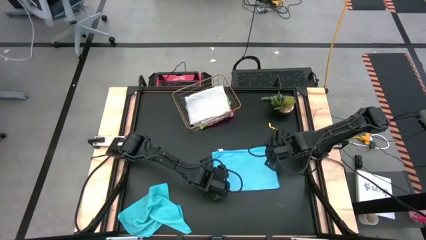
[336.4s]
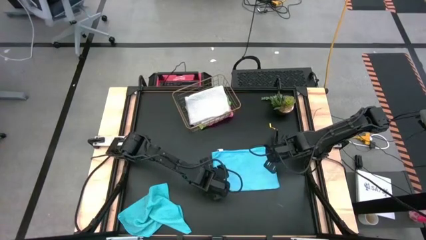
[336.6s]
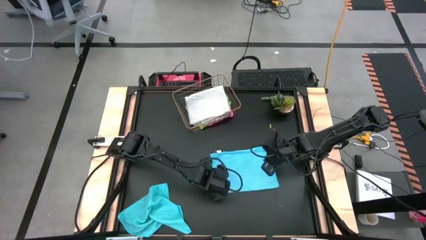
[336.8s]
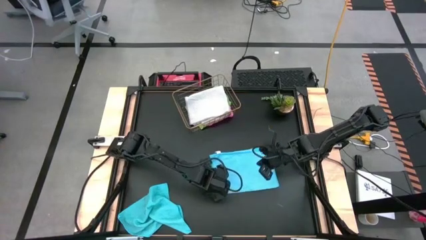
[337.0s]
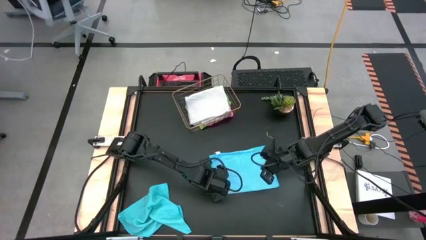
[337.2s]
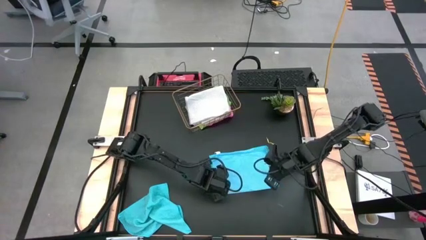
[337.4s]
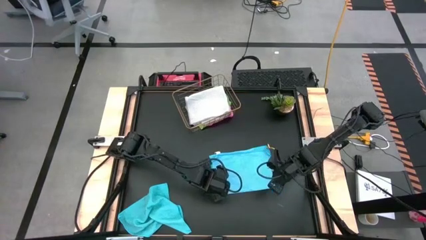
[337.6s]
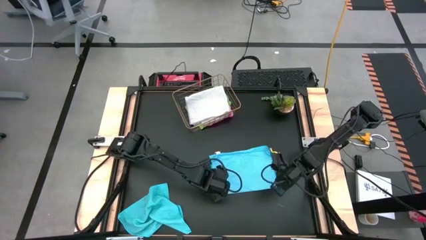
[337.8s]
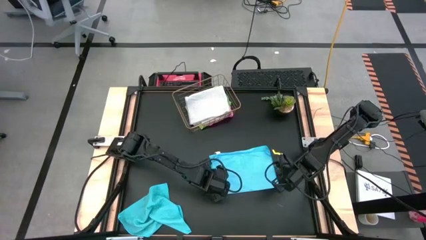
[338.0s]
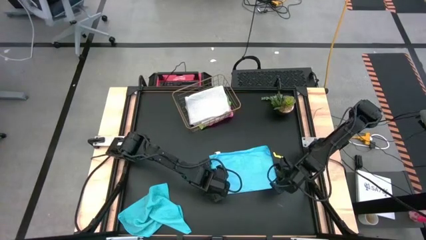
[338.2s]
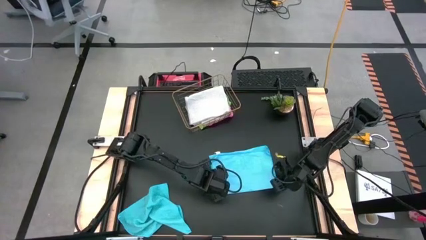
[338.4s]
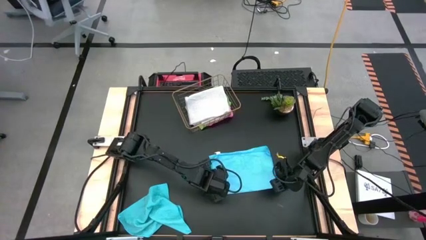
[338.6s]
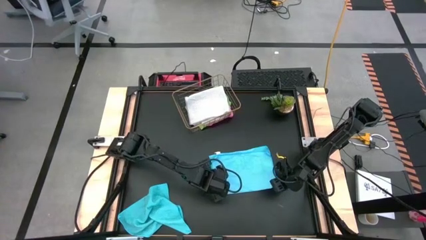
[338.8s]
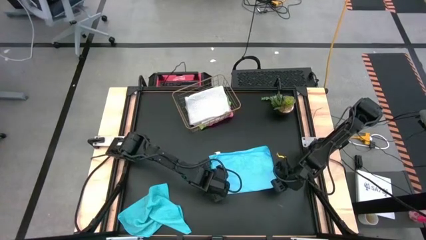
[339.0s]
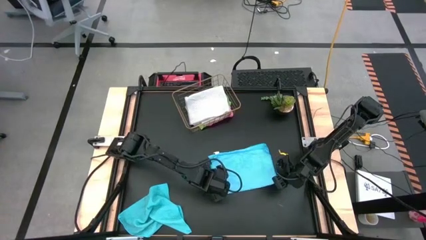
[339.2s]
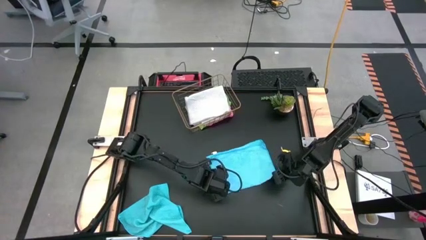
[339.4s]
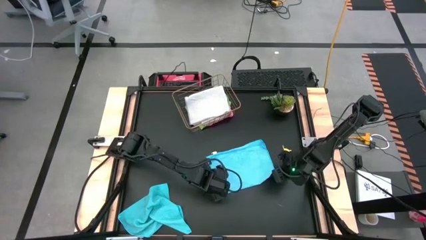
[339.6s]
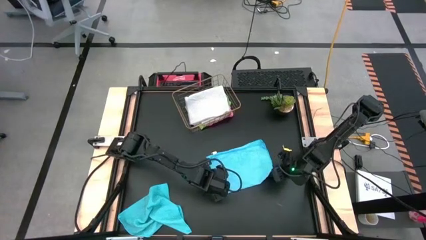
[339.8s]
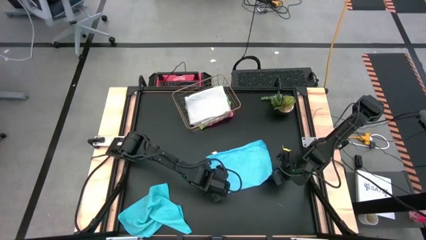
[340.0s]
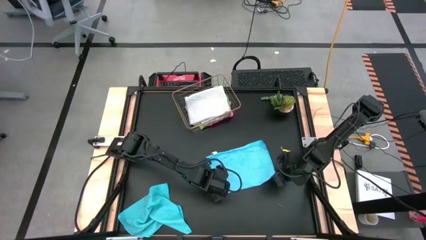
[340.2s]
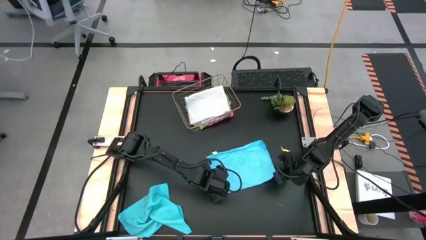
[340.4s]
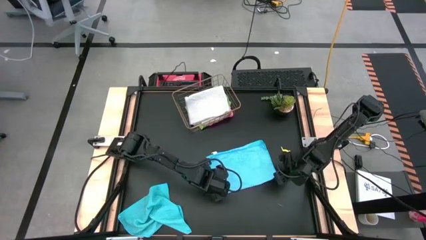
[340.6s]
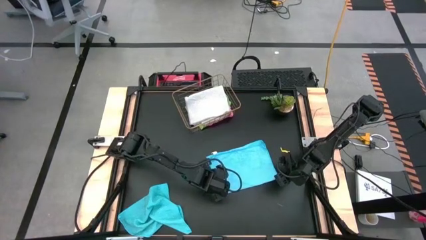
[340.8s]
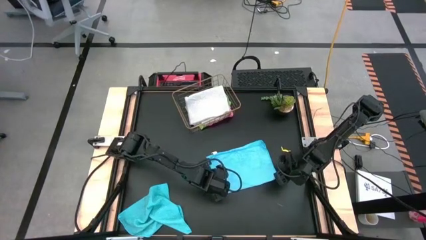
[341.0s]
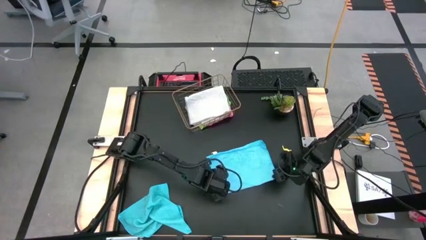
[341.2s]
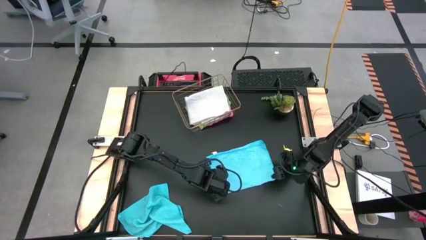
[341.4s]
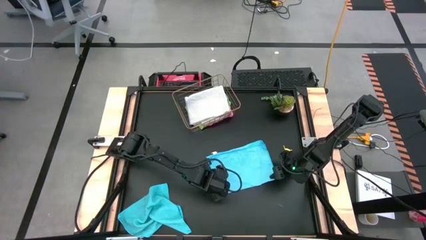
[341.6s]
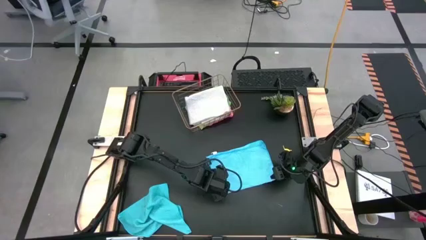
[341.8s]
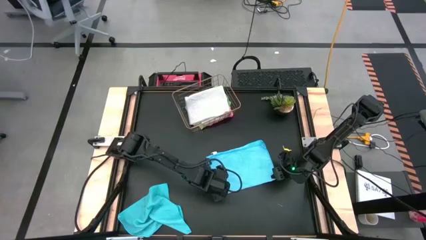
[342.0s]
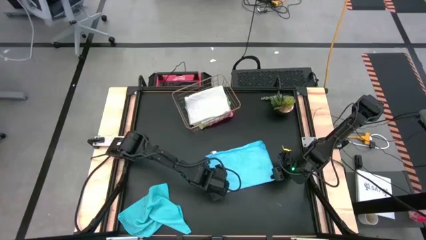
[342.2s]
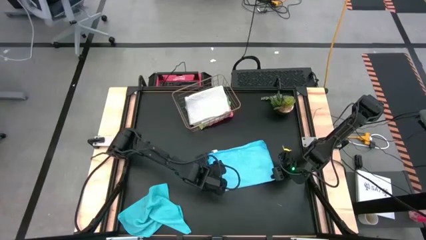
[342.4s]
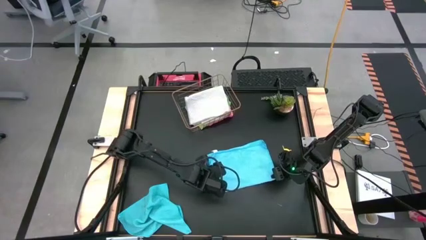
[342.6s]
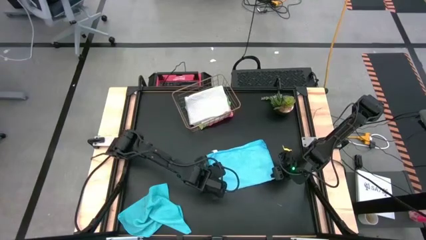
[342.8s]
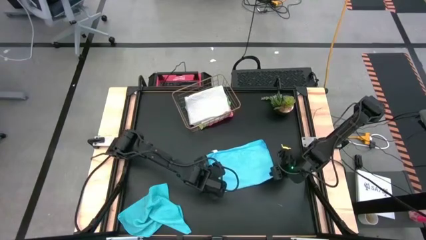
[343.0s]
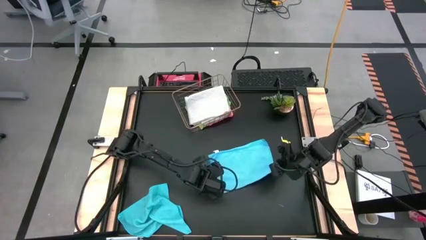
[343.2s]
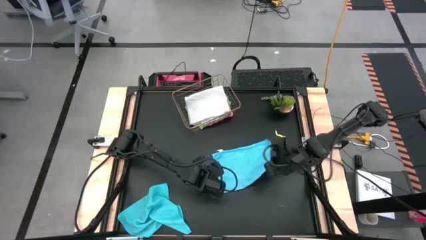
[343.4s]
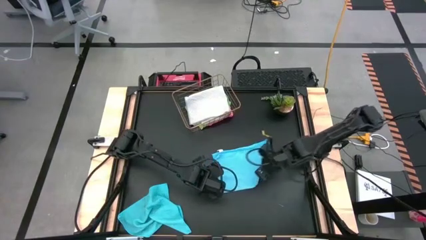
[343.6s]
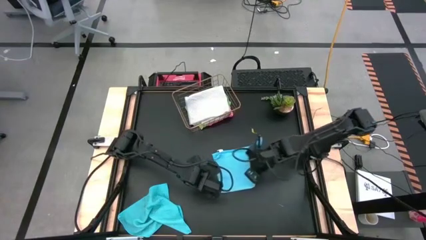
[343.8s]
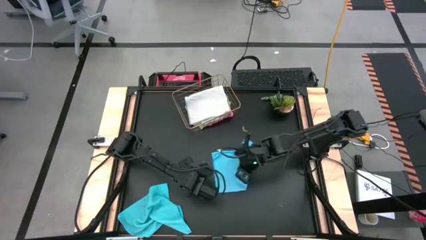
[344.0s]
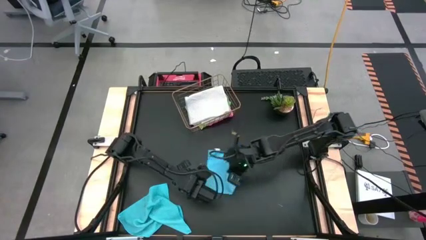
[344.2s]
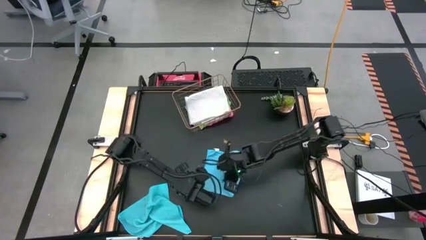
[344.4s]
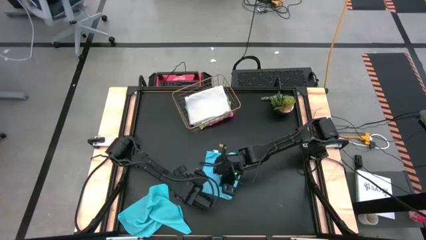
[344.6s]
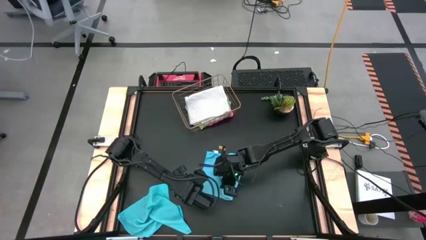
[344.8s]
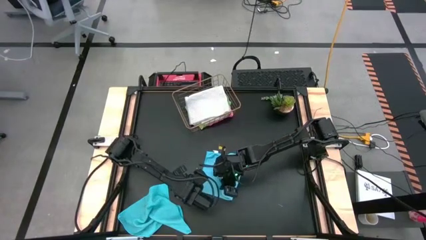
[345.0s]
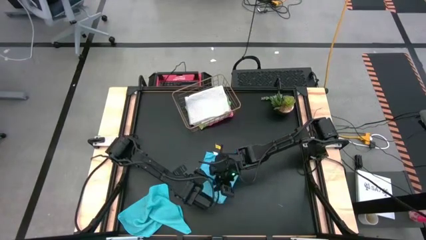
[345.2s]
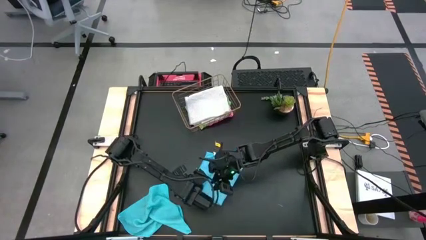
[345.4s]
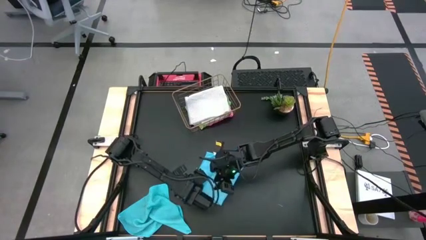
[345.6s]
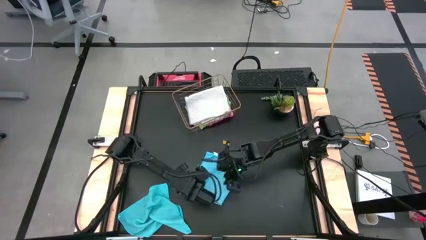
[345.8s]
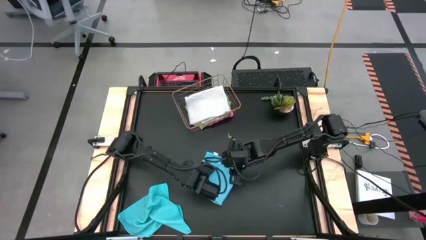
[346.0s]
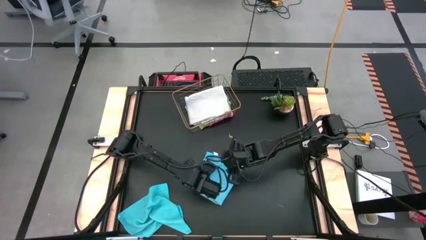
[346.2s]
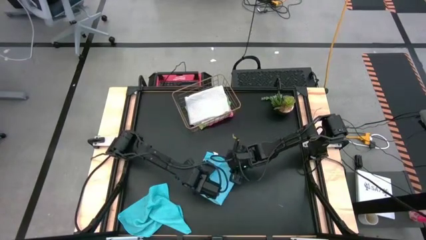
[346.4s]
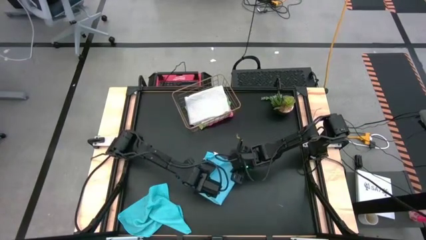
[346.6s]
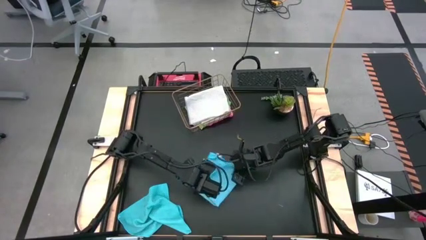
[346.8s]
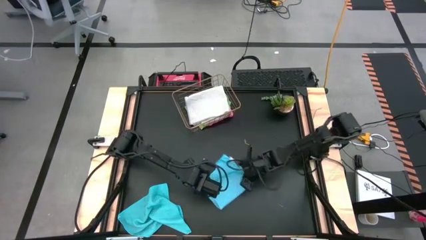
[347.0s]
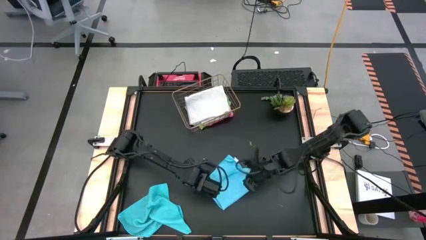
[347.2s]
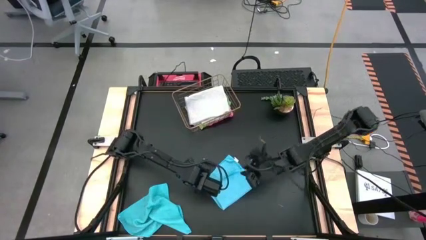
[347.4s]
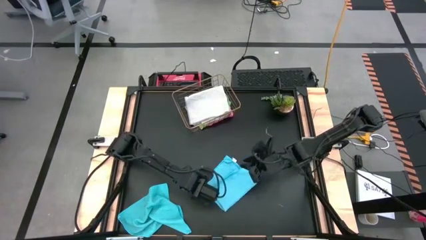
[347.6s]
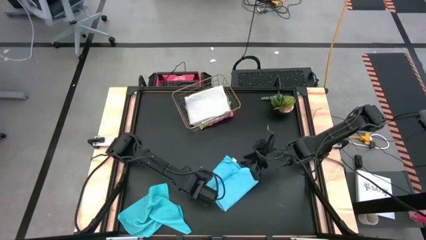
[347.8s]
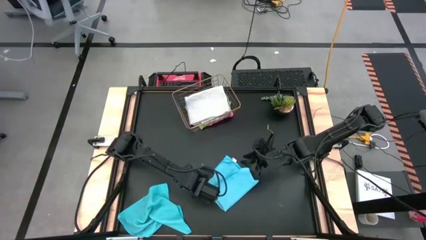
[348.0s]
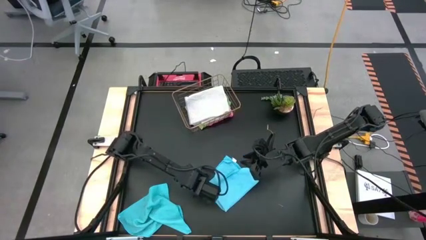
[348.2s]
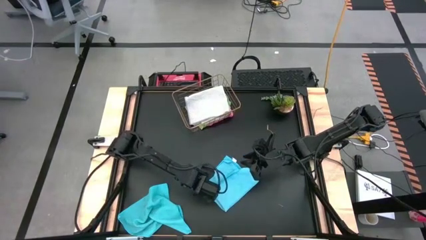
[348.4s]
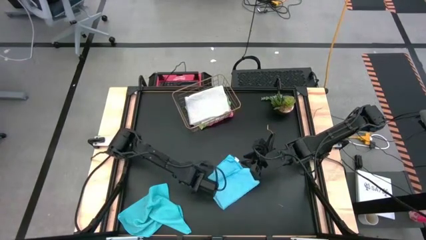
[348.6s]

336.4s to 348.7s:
Task: Fold microfiber towels
Fold the right light blue microfiber cloth
